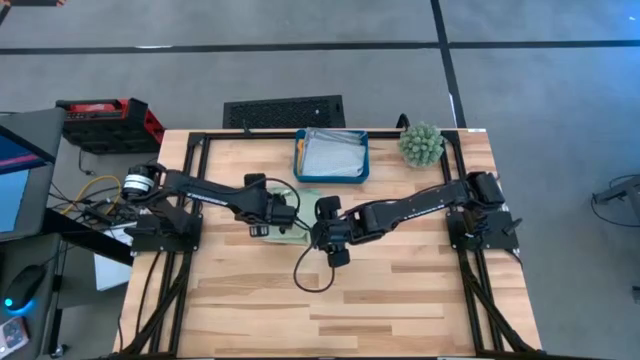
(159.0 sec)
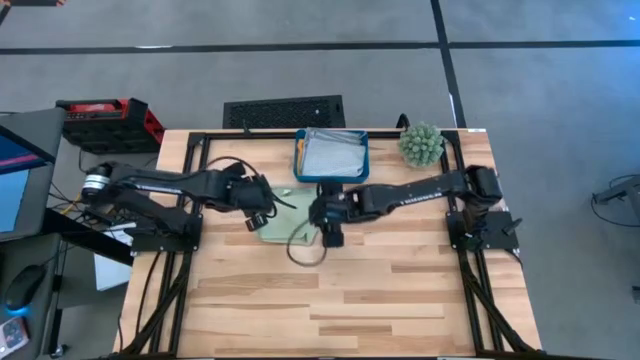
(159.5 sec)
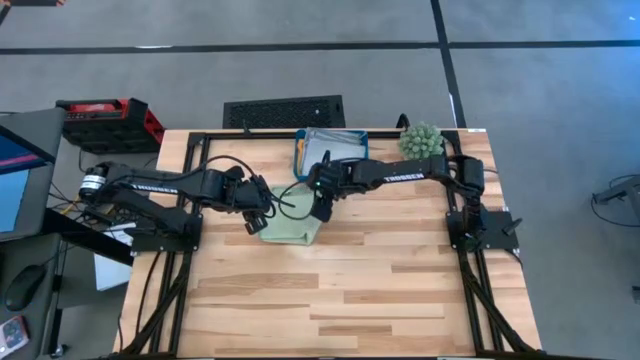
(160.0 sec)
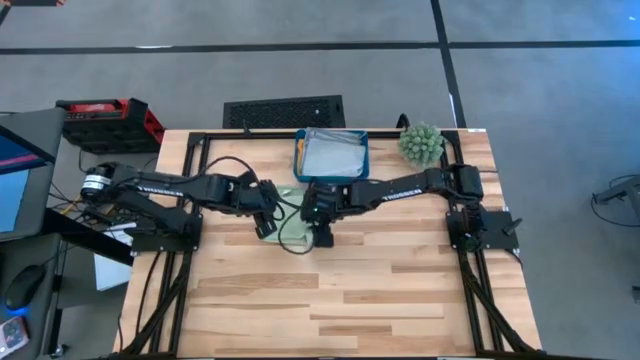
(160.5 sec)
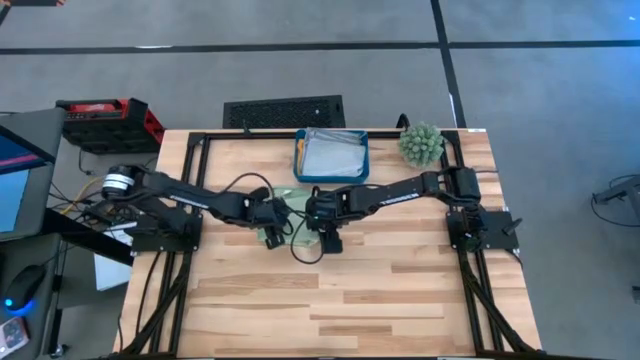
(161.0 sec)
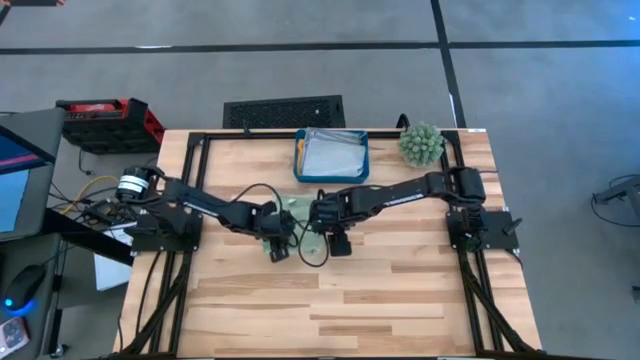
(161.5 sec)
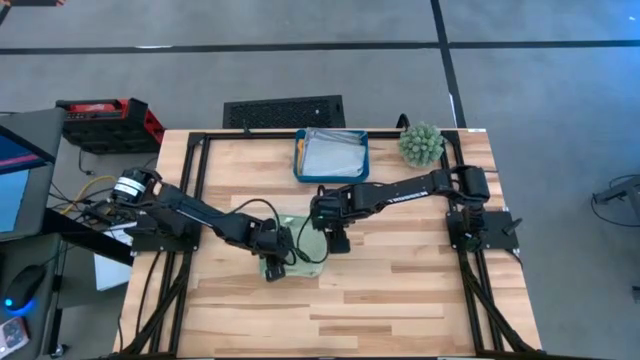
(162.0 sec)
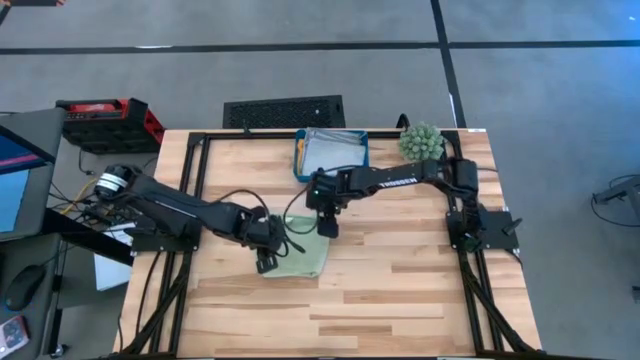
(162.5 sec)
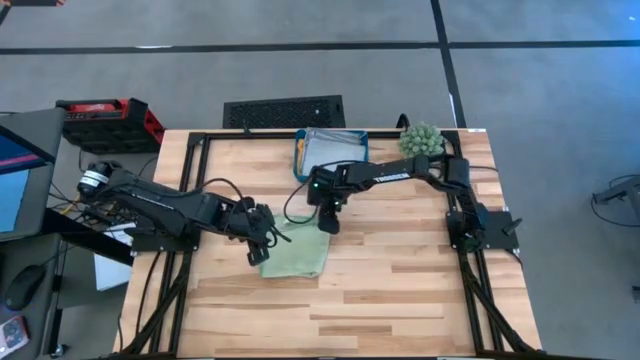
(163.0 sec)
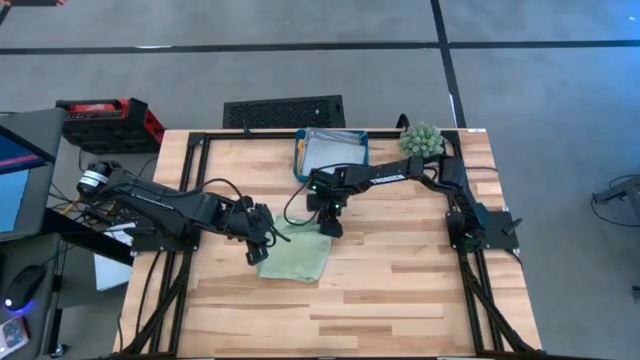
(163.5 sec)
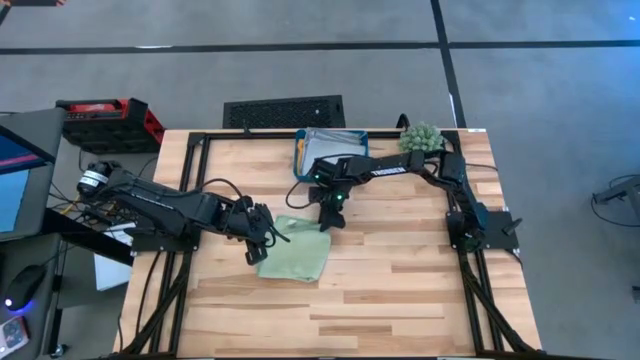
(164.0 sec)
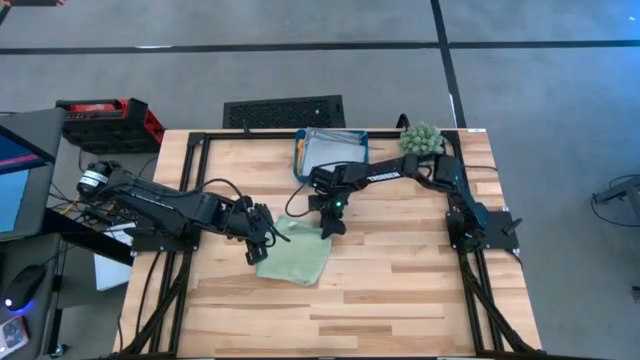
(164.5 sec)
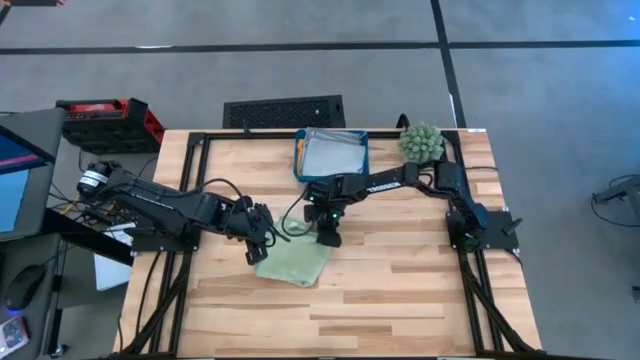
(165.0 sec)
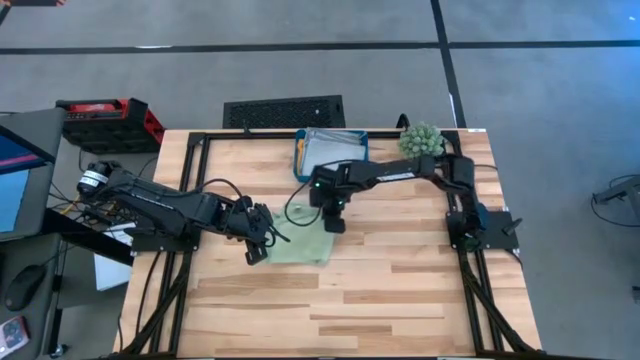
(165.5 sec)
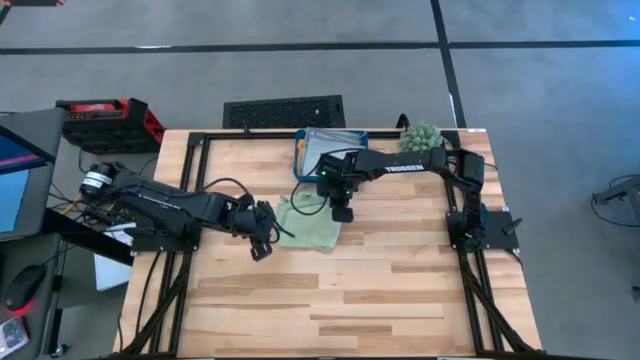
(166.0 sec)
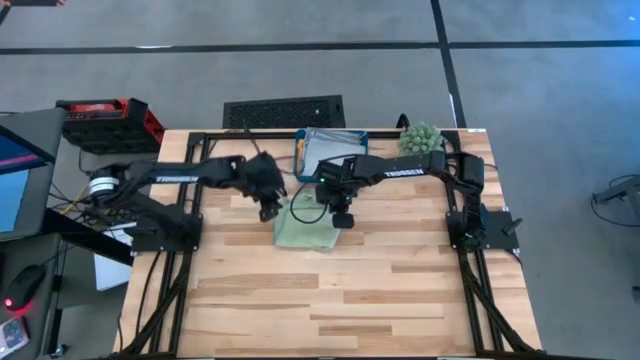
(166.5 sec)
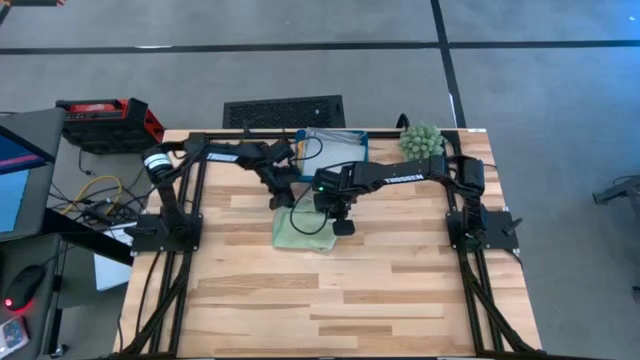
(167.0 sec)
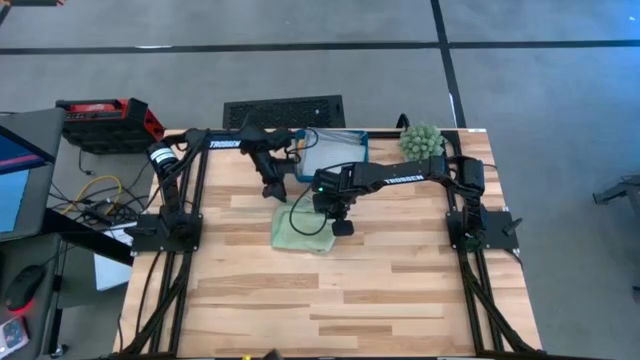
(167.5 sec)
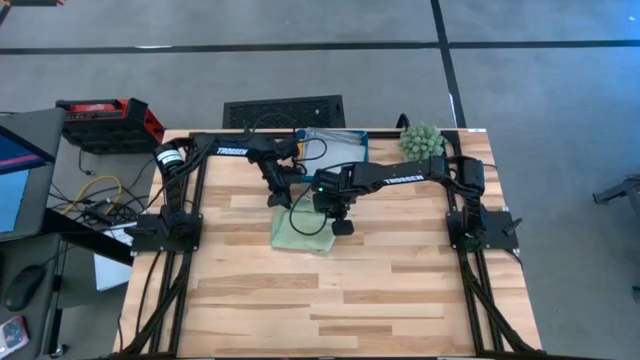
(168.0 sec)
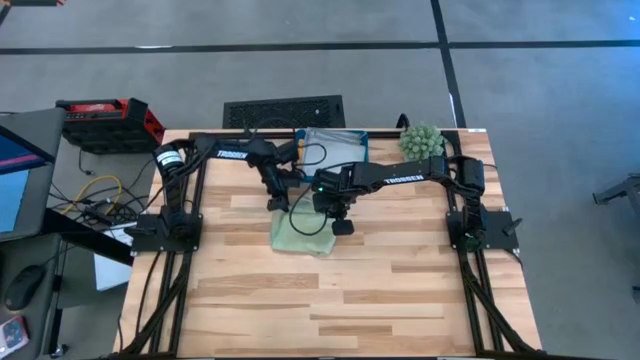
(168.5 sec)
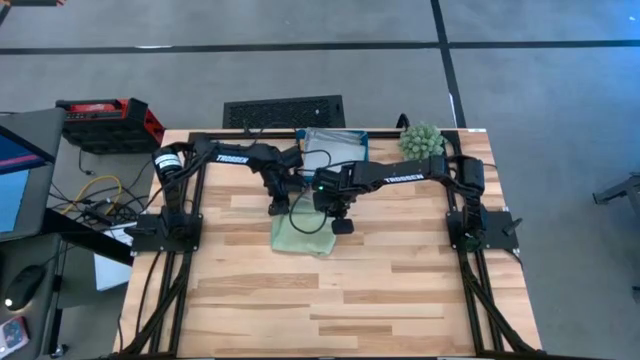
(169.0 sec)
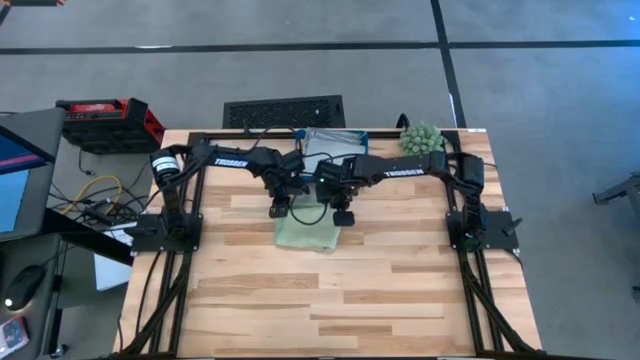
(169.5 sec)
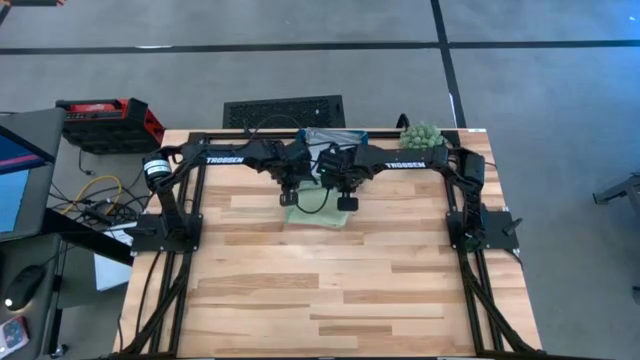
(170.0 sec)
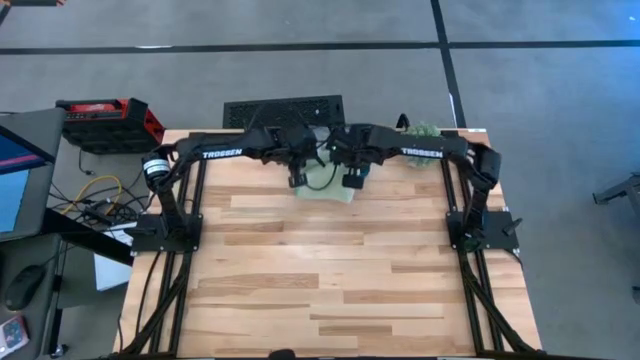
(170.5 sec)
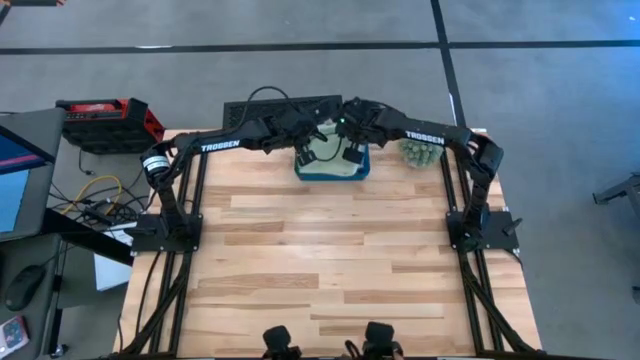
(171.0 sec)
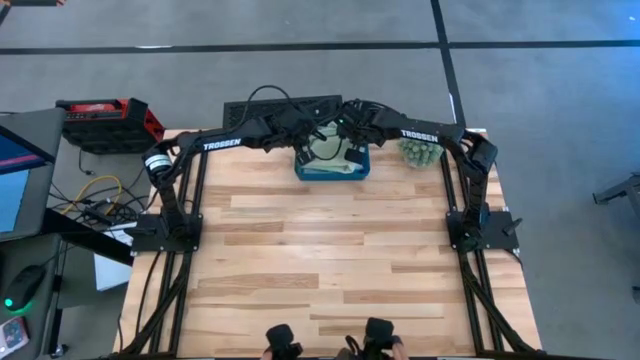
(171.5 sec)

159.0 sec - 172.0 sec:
Task: Fold microfiber towels
Put the green microfiber cloth in the blue bin

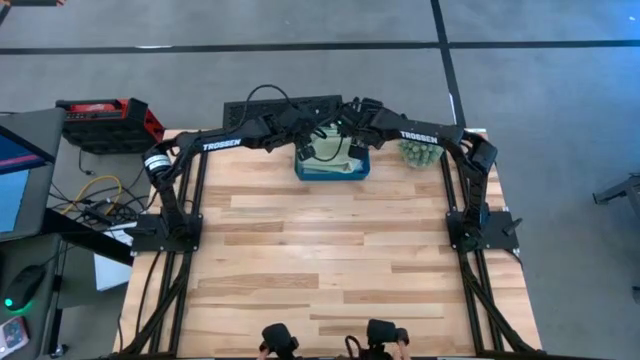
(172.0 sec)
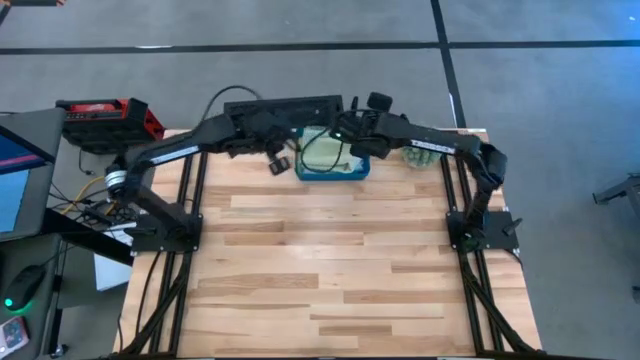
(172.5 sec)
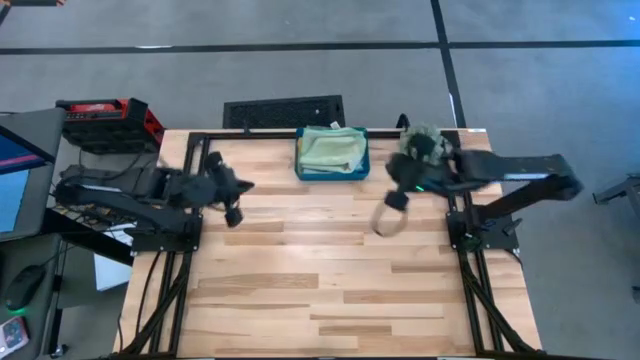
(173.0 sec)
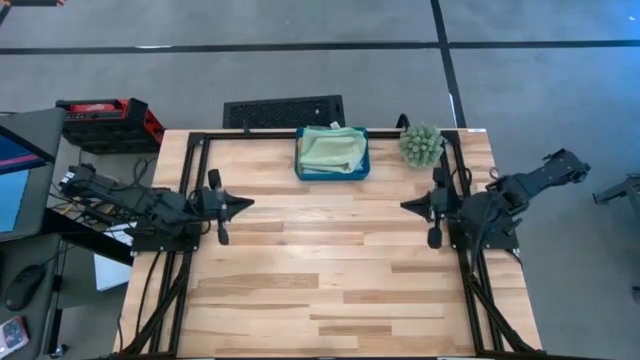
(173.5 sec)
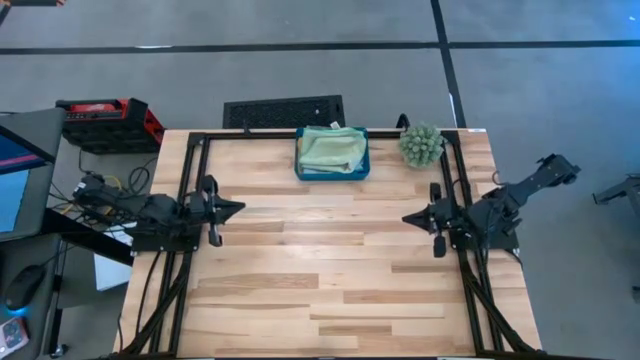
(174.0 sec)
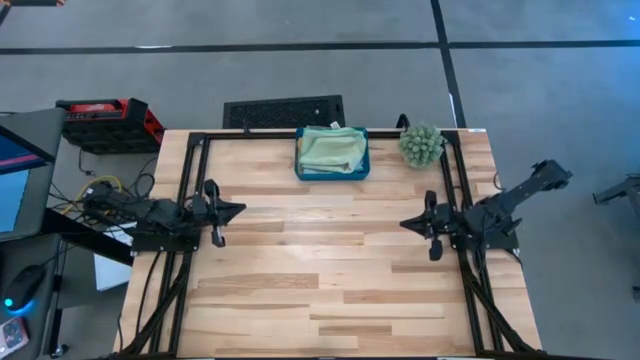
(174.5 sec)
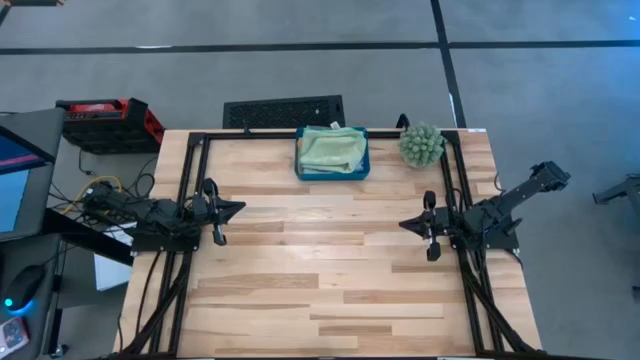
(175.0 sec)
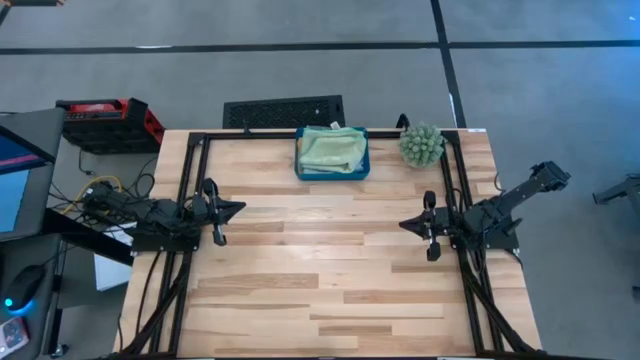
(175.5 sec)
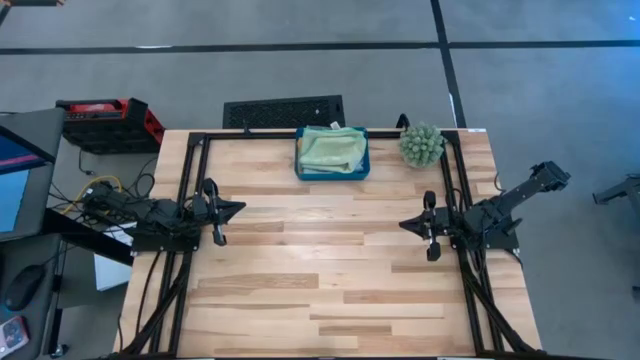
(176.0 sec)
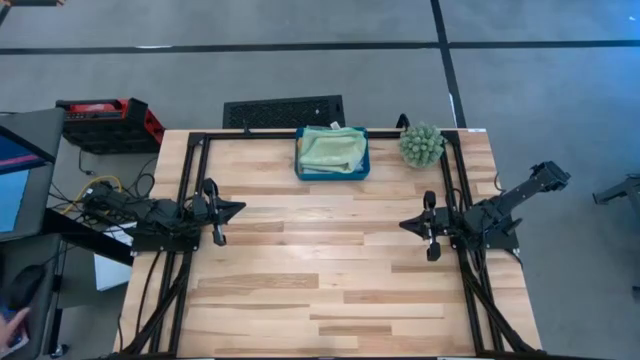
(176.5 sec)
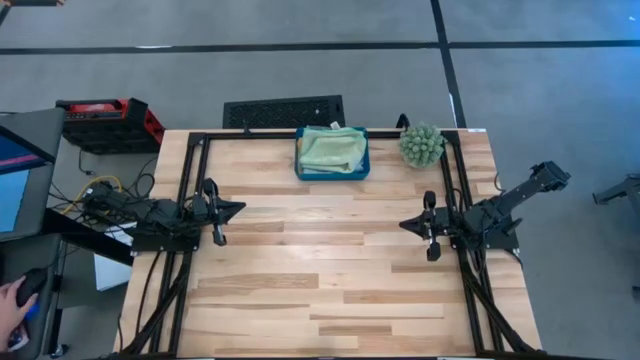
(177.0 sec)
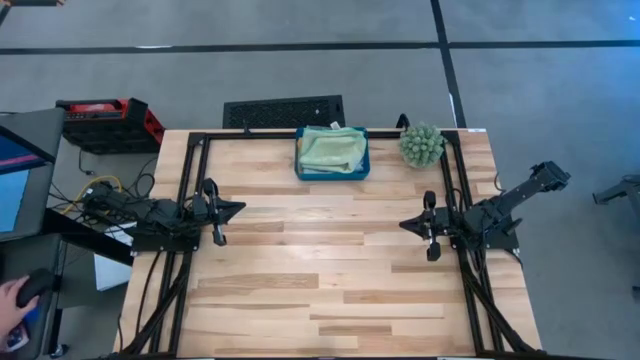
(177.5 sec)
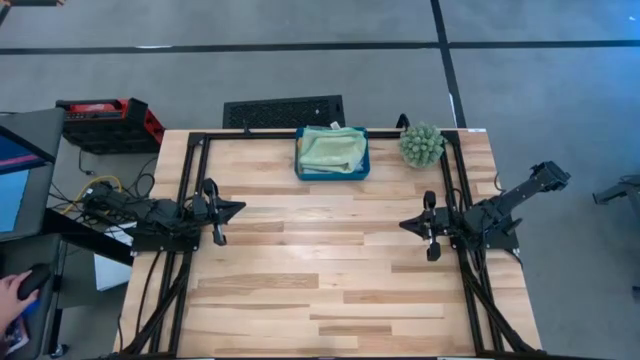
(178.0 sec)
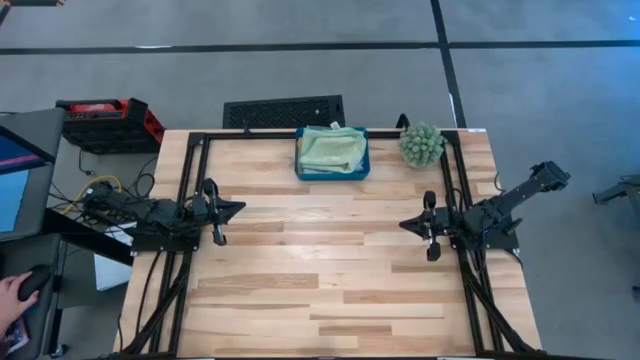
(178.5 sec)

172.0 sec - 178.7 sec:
Return to Home Position
